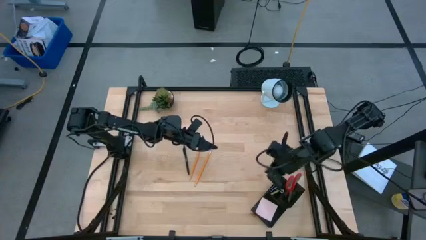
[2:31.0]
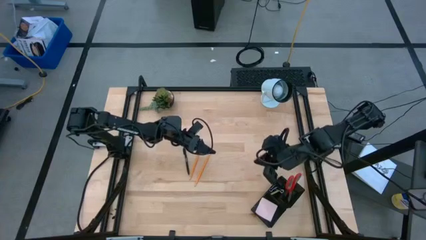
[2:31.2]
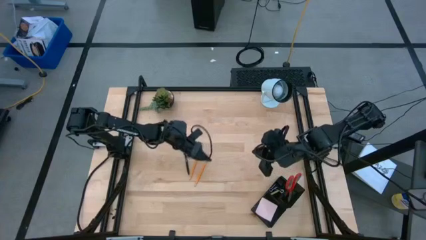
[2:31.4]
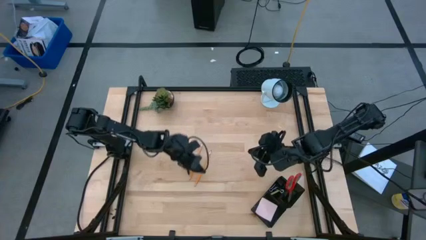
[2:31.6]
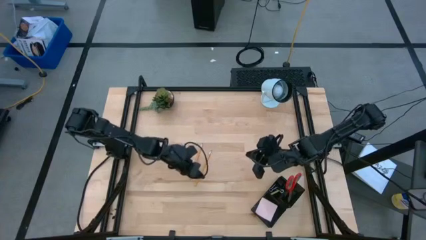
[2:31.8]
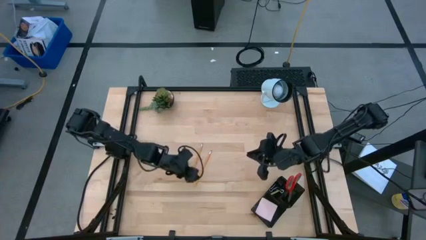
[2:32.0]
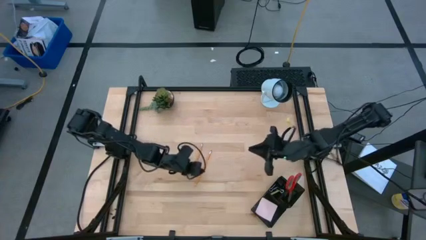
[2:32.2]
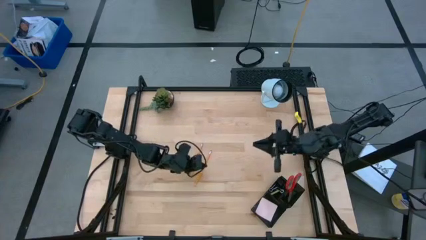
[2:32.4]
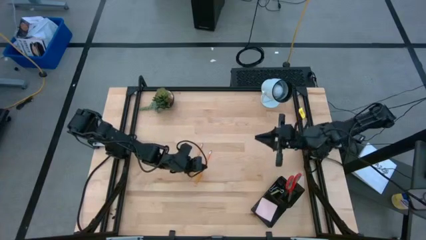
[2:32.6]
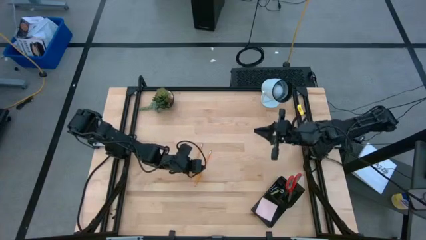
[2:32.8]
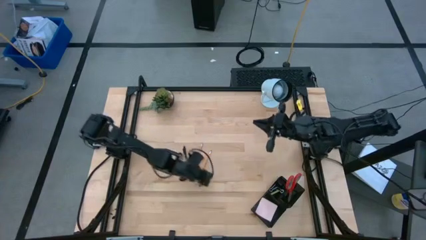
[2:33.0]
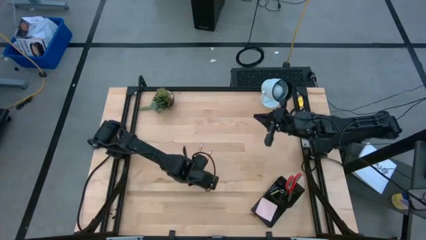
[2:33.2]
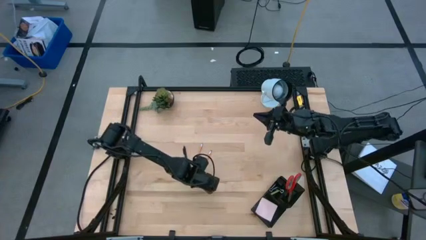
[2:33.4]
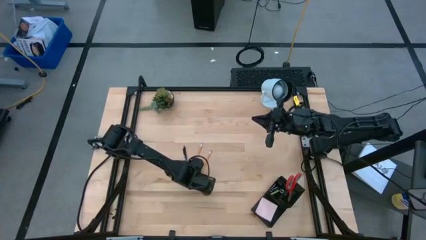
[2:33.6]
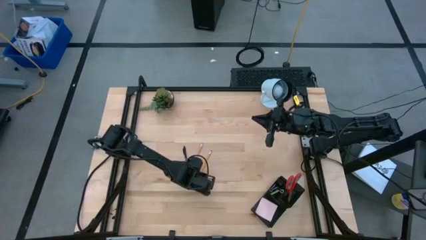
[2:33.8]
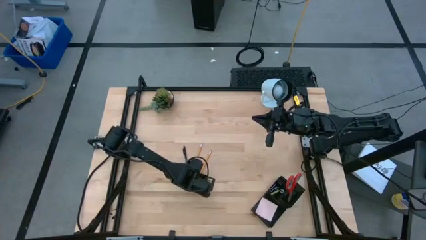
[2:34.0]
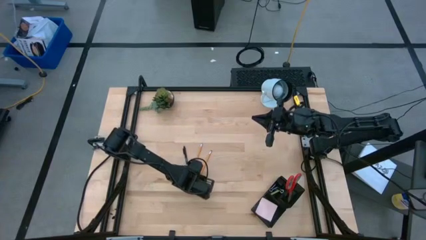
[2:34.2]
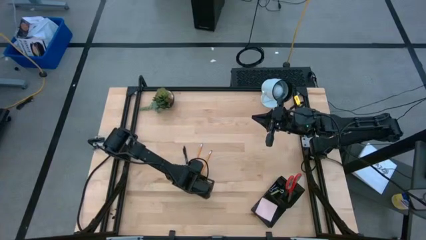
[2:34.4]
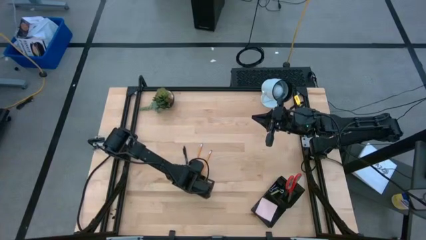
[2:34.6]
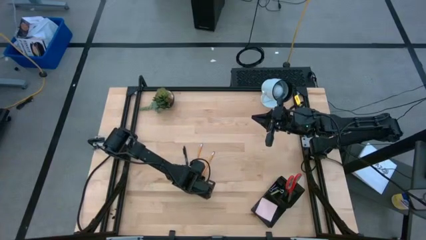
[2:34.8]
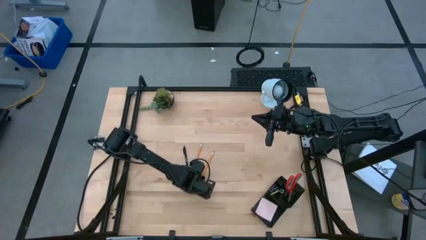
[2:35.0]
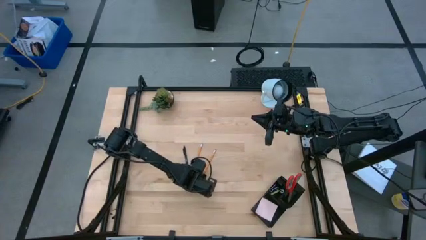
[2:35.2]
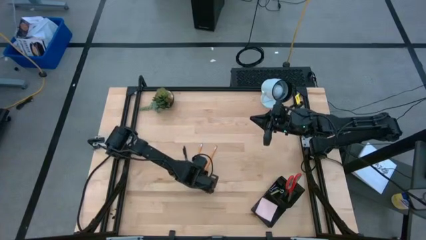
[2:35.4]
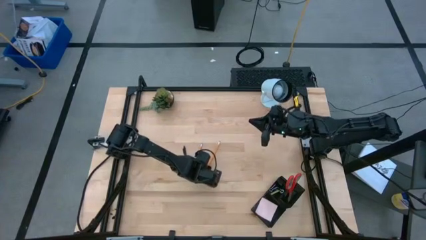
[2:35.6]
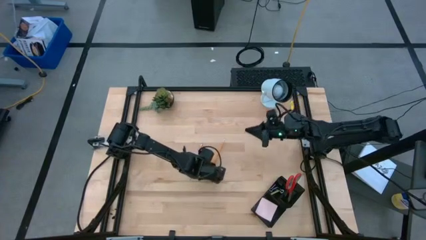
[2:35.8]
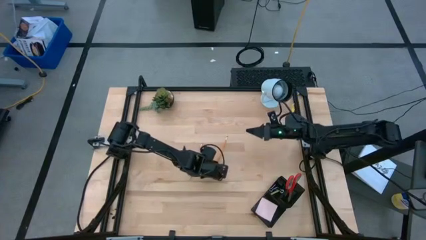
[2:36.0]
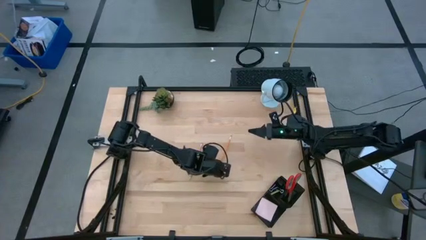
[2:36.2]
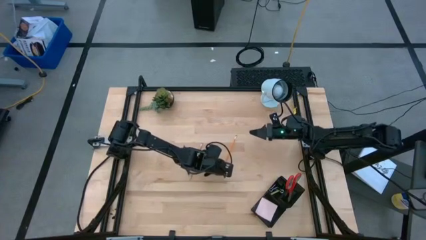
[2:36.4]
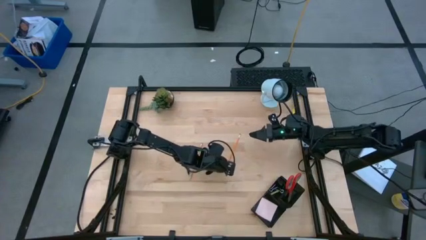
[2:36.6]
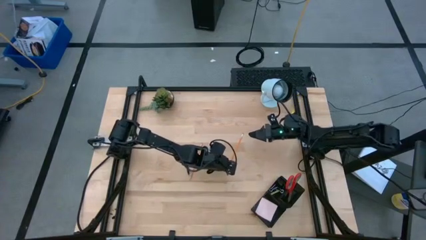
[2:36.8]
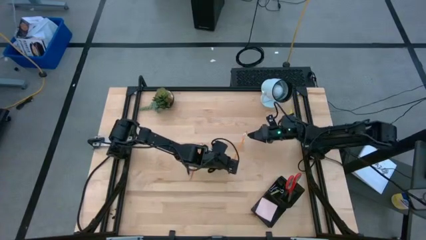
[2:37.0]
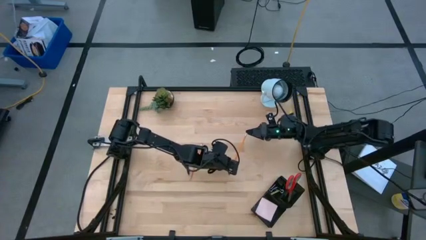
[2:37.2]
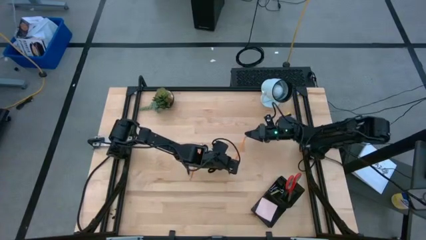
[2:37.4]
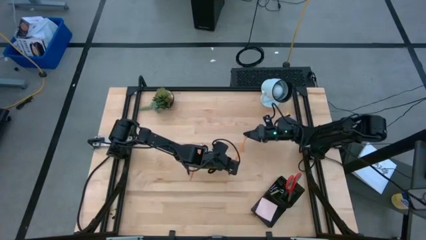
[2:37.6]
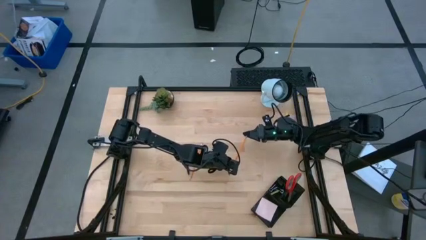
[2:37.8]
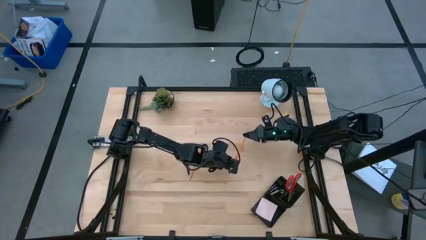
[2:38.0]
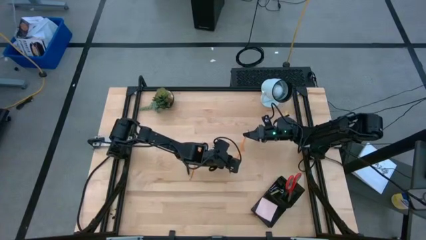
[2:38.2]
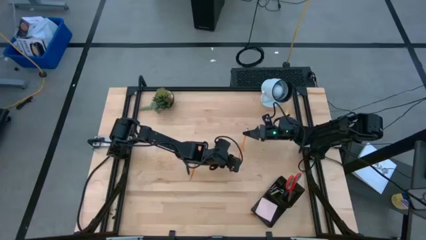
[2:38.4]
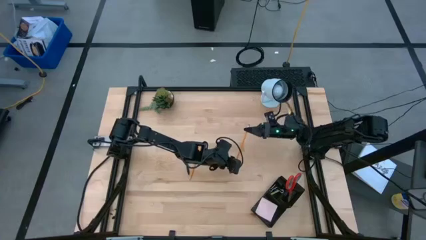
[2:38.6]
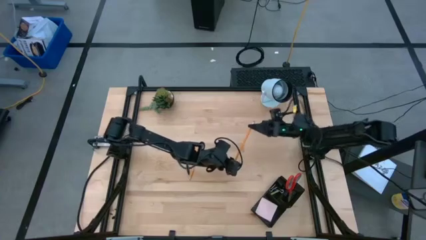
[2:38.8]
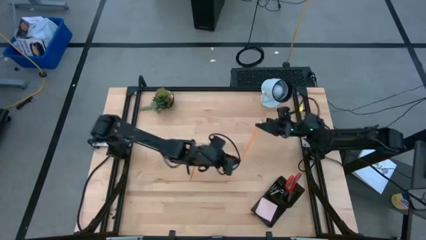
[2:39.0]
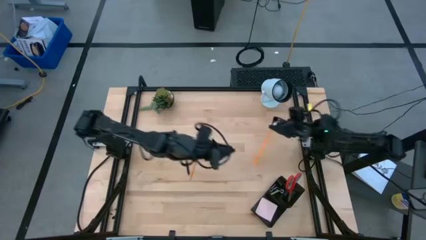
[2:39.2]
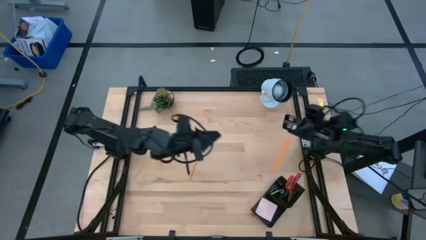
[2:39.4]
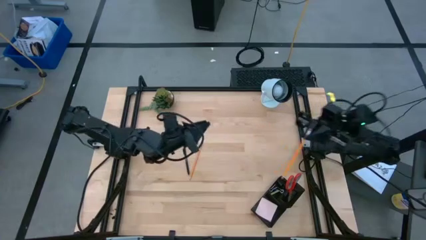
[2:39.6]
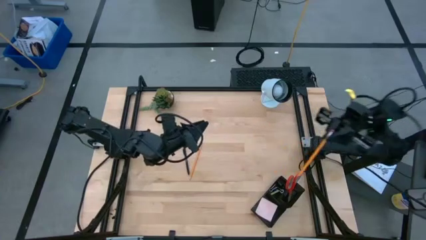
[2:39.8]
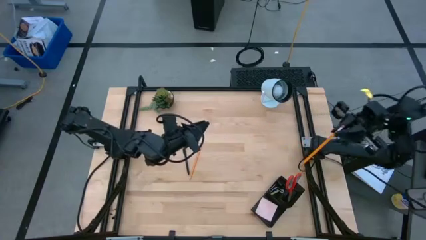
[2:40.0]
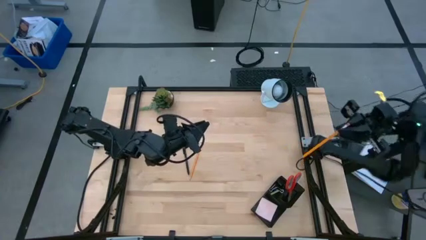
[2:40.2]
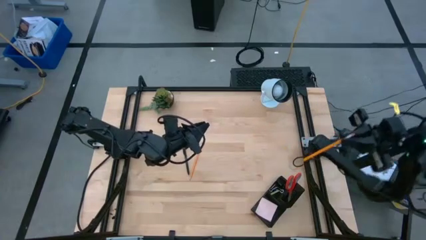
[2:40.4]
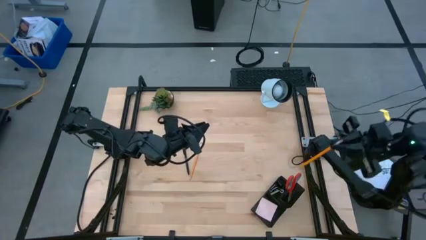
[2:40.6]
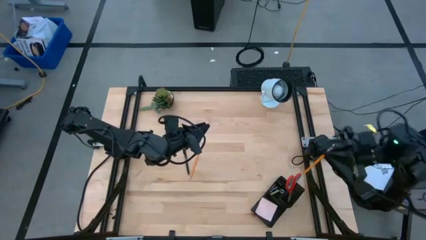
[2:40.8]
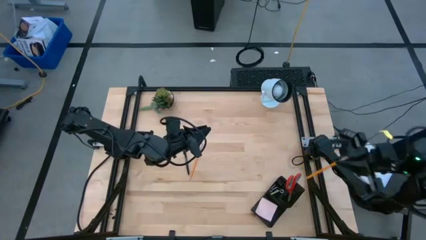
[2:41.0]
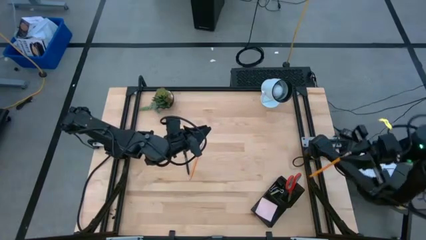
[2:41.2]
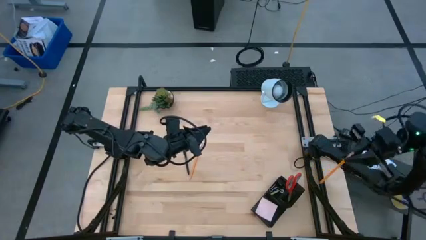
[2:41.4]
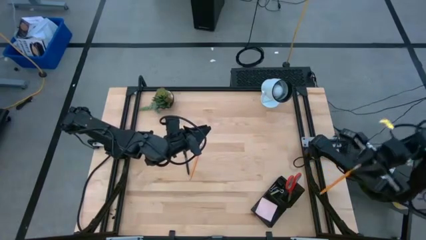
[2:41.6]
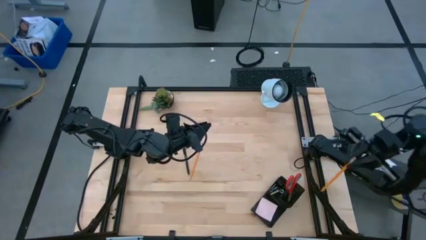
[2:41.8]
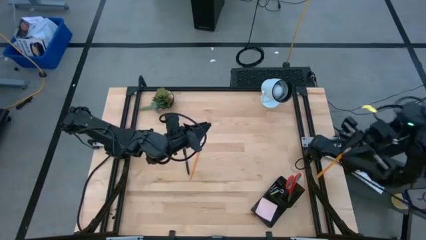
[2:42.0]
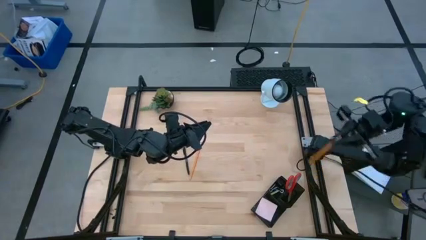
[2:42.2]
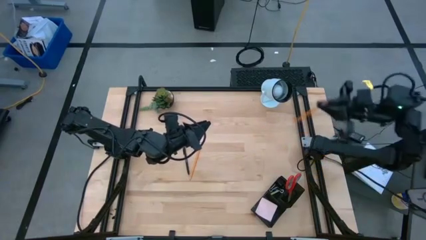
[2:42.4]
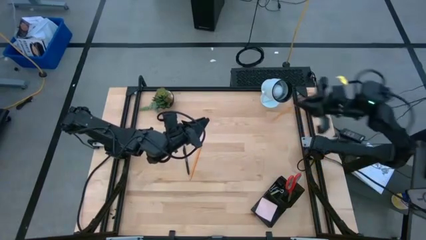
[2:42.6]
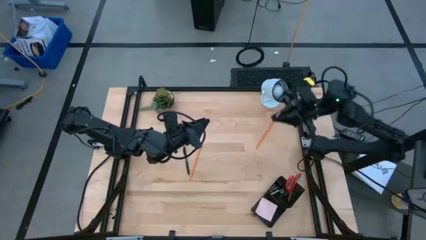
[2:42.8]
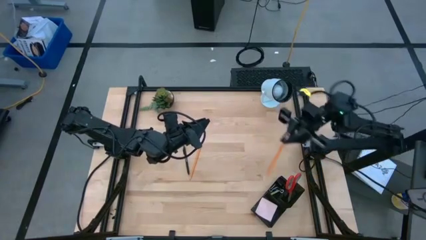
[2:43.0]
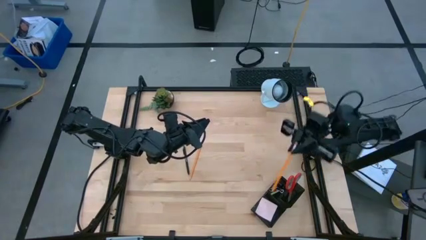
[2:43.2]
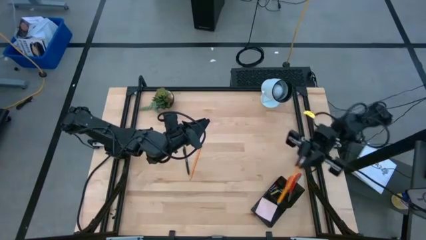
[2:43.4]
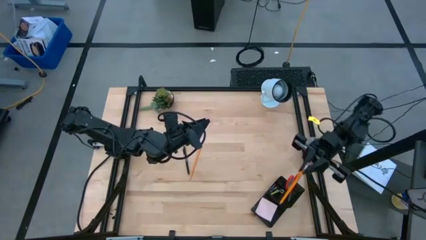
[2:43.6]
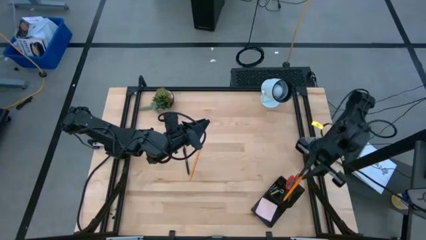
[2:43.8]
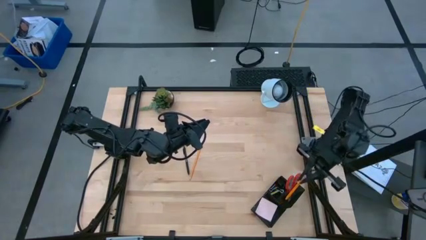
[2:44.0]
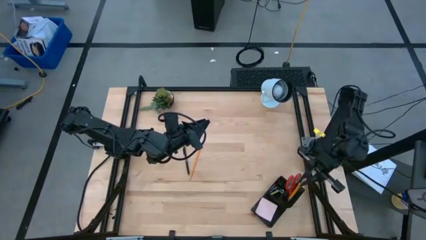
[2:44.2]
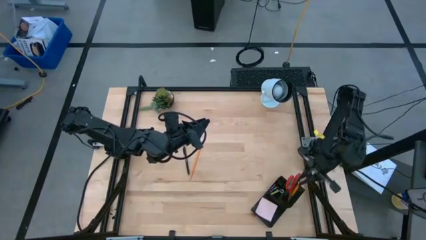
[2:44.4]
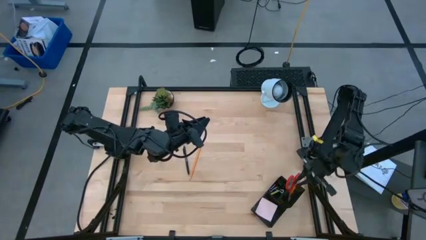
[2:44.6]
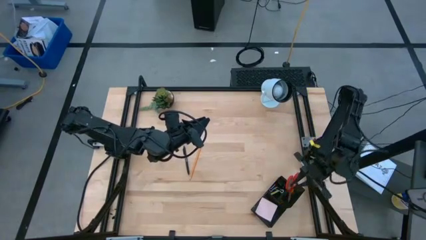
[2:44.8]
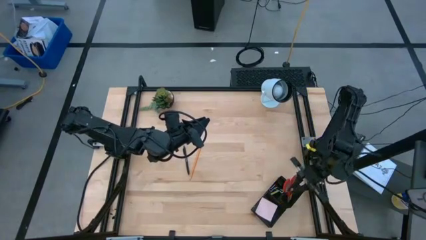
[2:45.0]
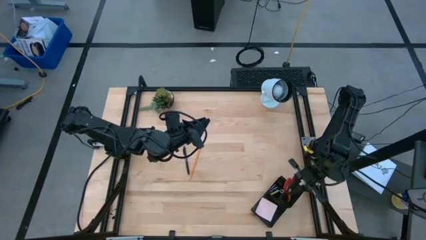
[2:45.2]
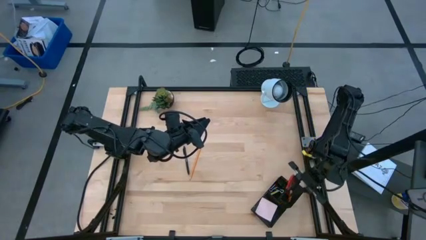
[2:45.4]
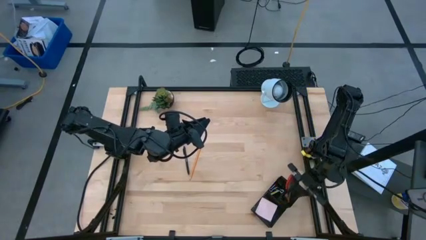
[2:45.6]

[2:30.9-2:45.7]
Task: Pick and place office supplies into organizer
Put the light orange pencil into the desk organizer

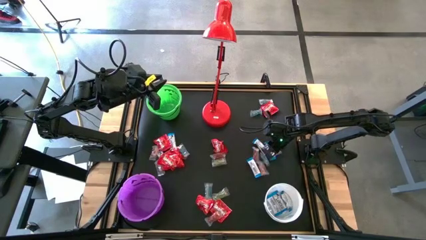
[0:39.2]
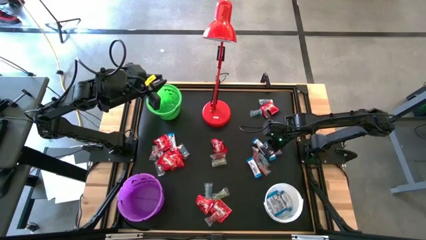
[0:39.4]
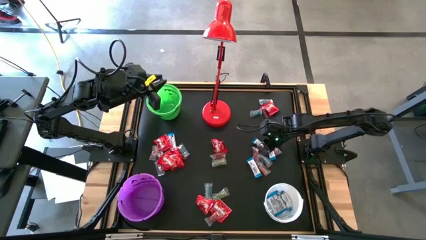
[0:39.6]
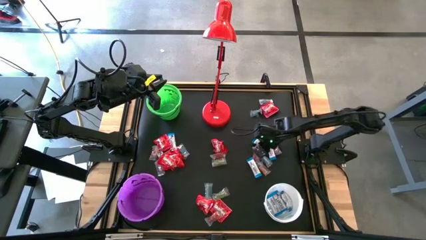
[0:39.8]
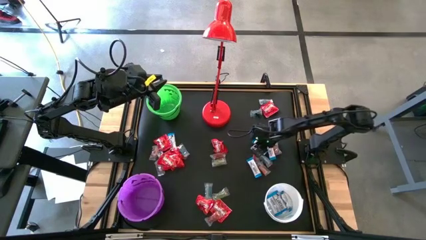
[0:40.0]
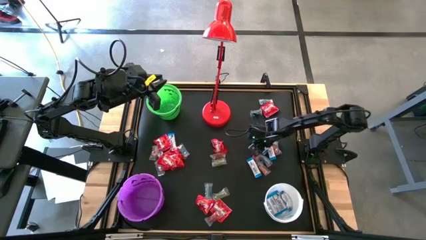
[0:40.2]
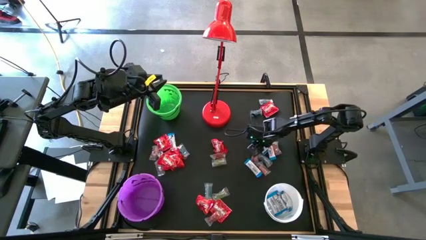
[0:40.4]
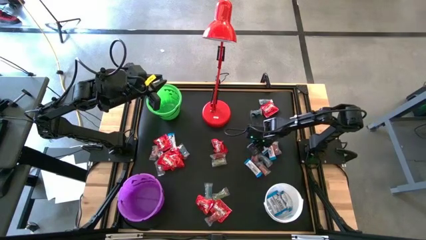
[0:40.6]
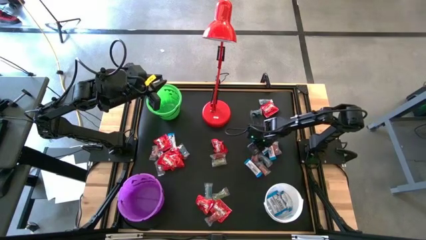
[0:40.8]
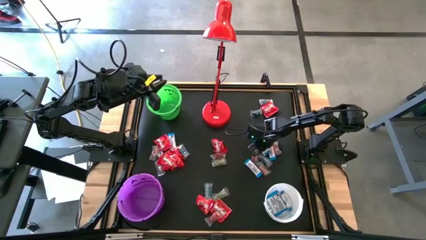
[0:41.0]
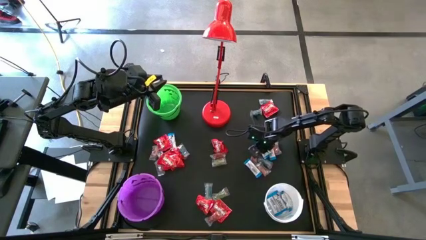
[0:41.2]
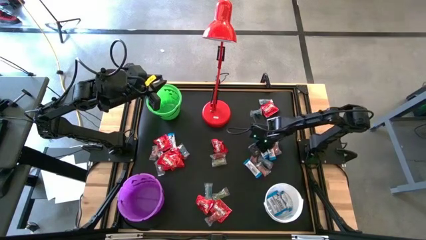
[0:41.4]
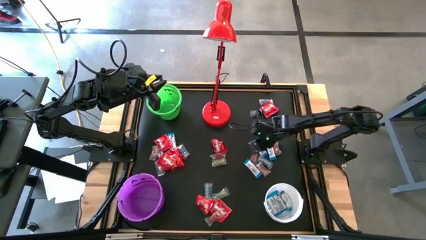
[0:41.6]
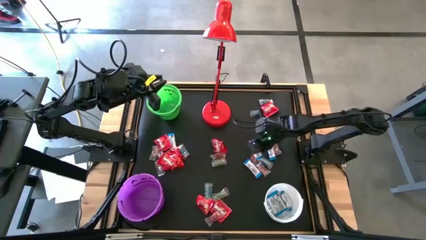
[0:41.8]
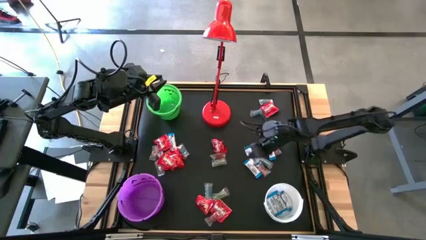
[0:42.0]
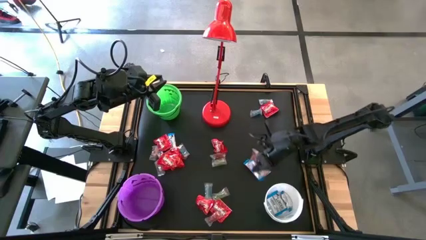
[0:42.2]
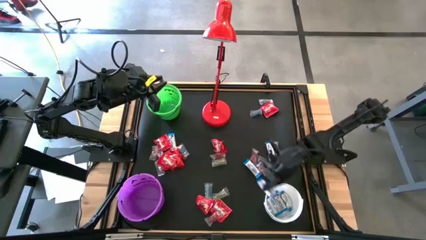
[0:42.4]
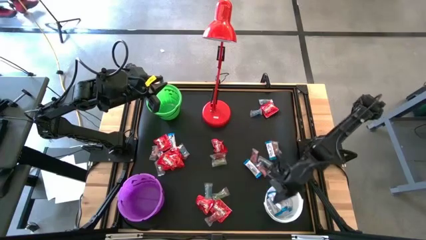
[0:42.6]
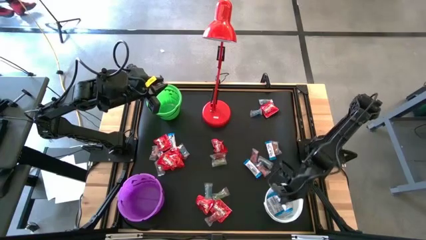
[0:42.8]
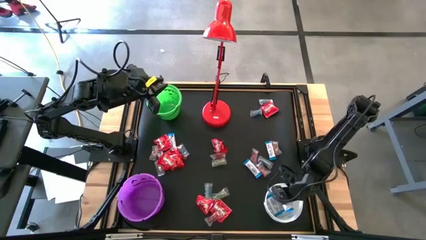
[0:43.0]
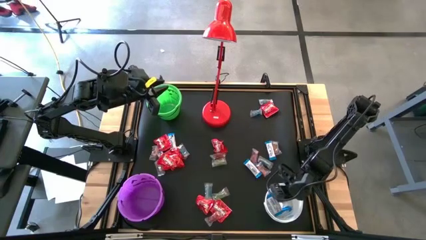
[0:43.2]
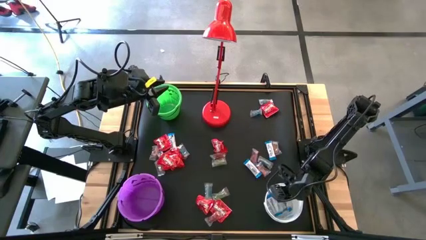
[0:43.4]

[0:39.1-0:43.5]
Task: Sort candy
Put the white chocolate into the white bucket
